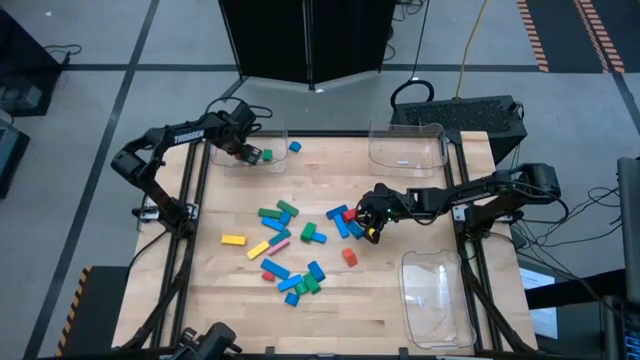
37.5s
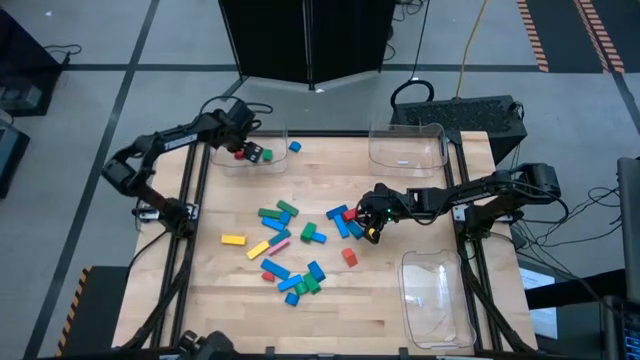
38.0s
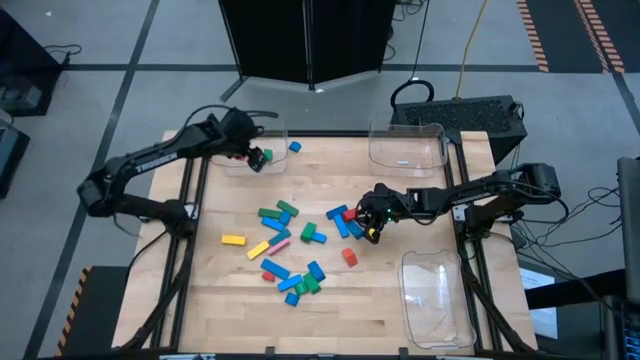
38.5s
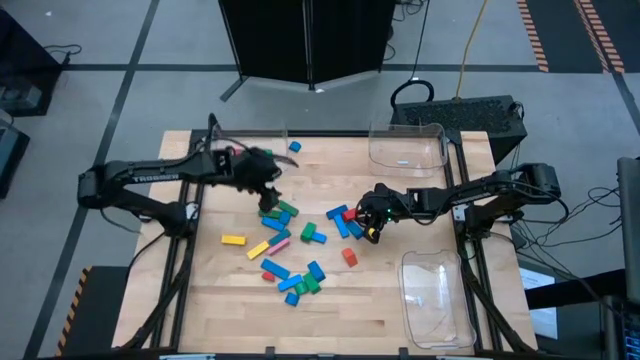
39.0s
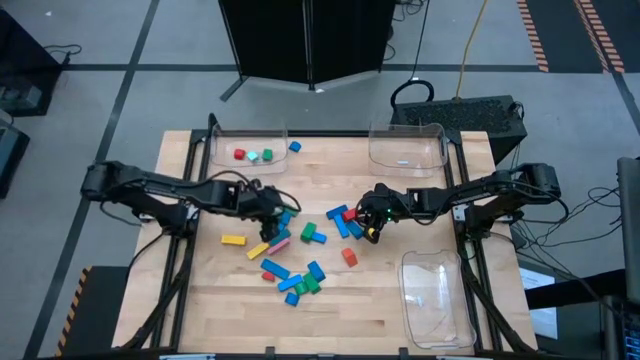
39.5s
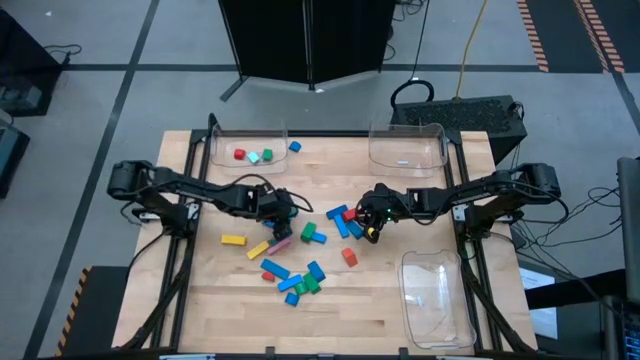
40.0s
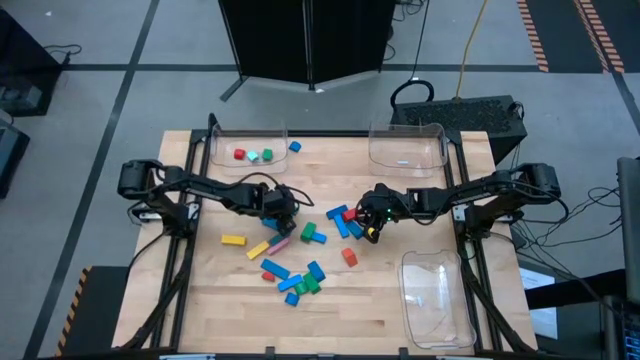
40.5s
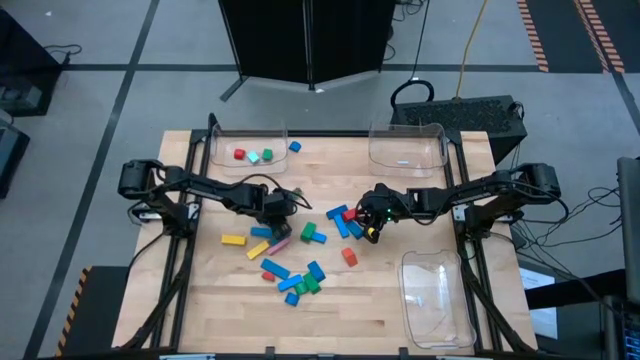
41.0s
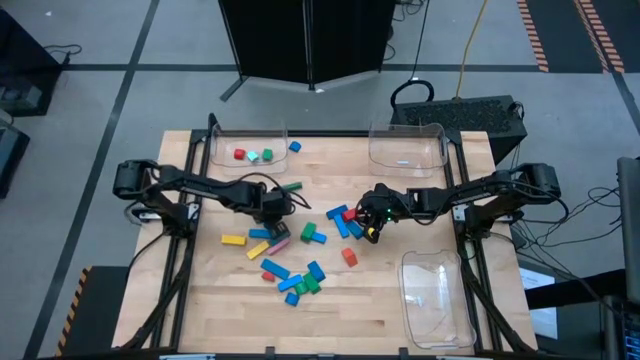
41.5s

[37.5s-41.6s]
Task: Sort blocks by size
Put the blue half-circle block into the top left transparent bin

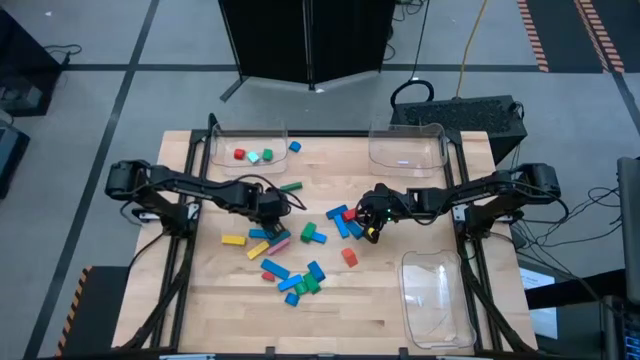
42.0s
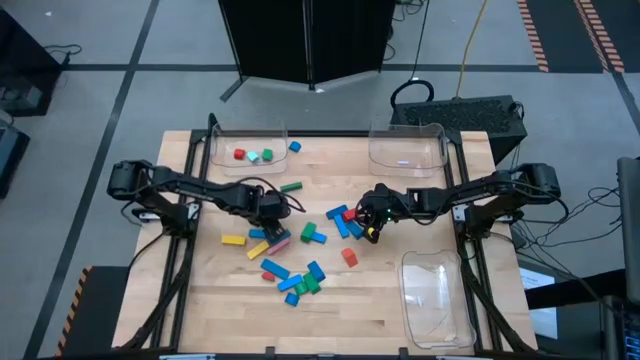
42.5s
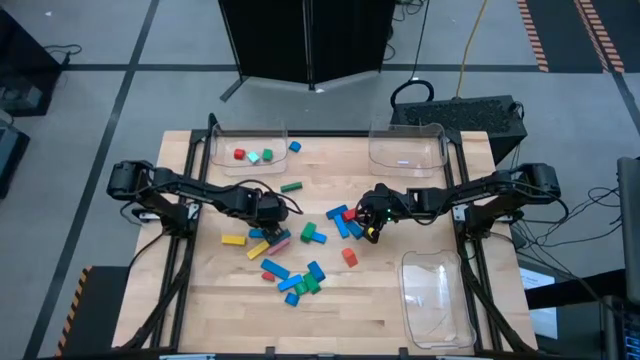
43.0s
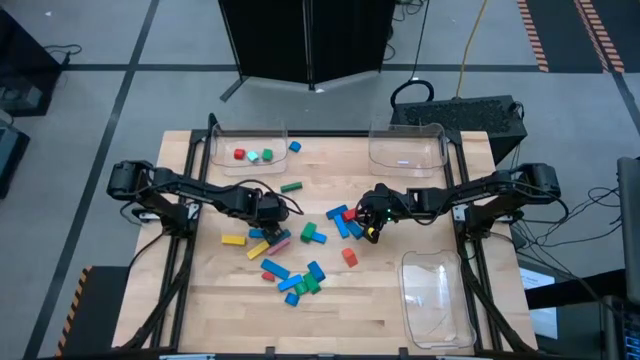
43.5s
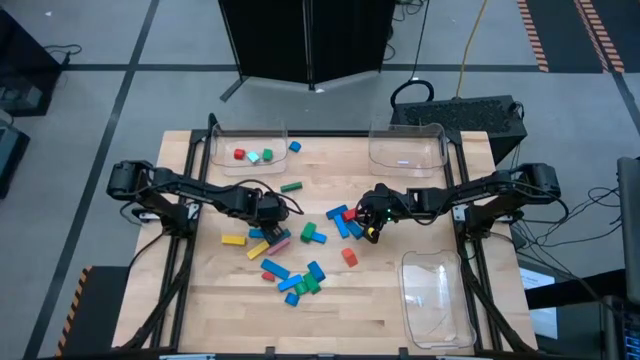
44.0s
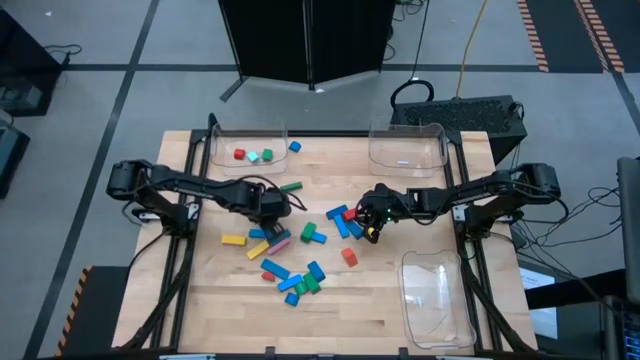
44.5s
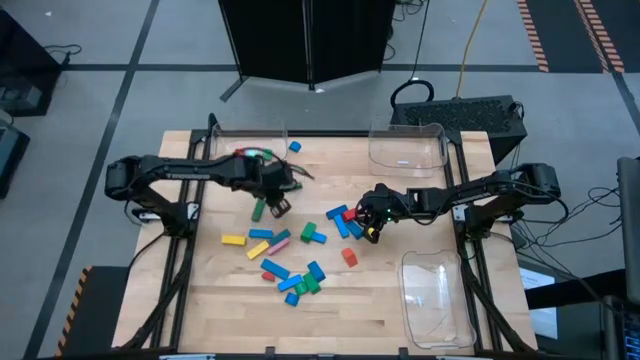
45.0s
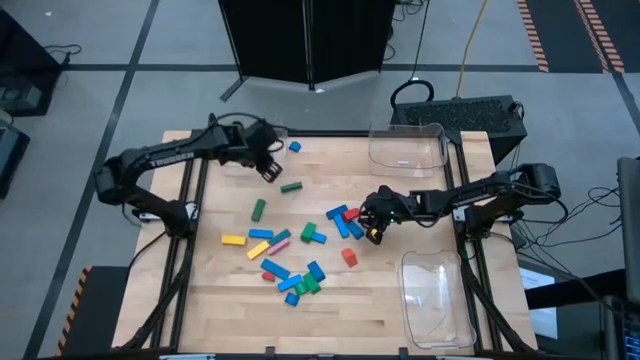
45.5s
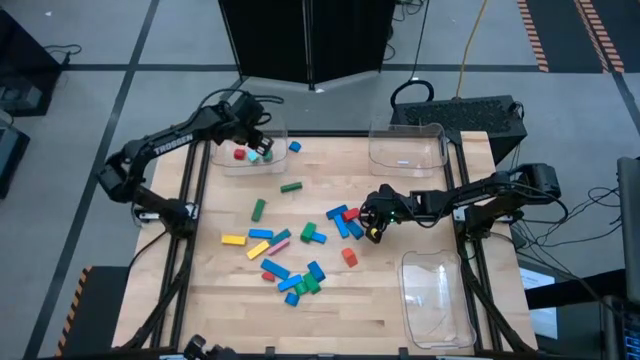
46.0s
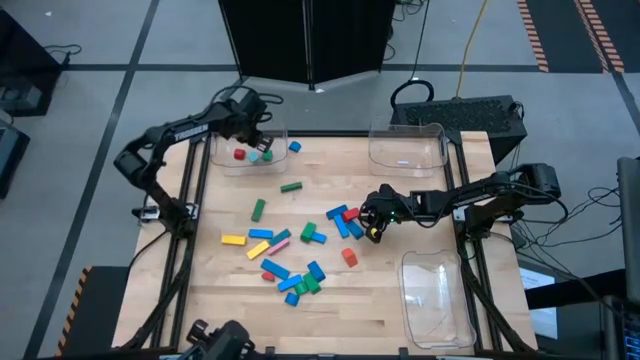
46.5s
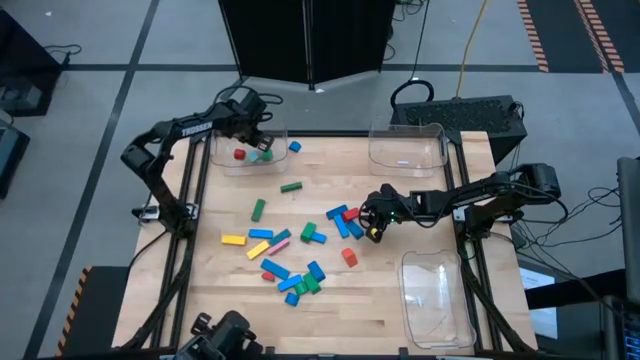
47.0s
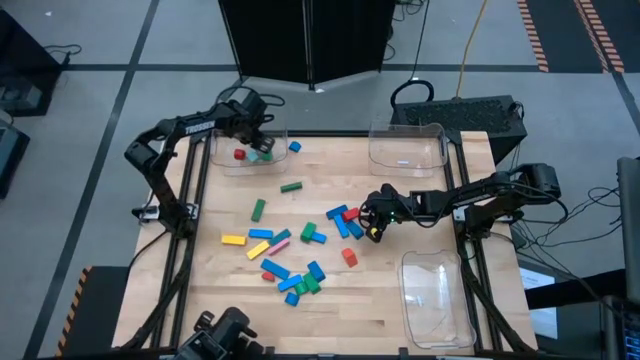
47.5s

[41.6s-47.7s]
Put the blue half-circle block into the top left transparent bin

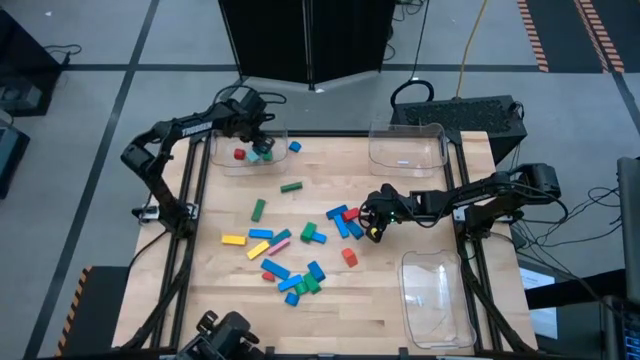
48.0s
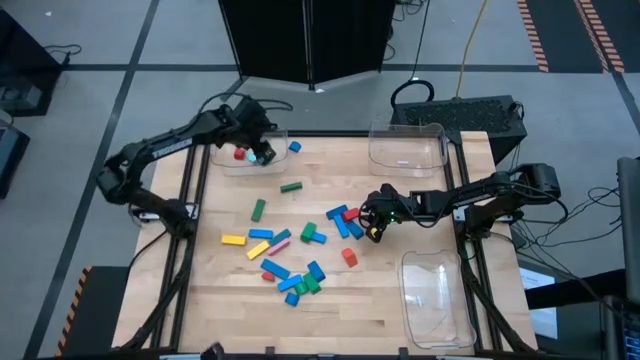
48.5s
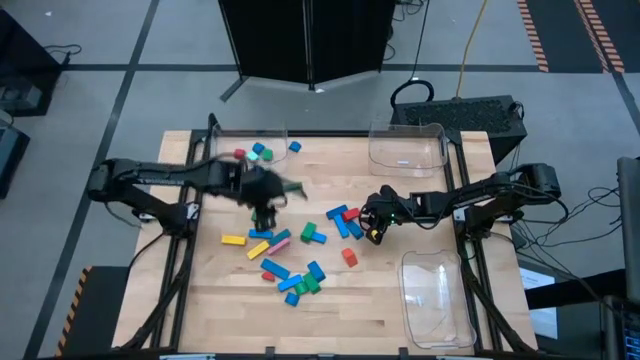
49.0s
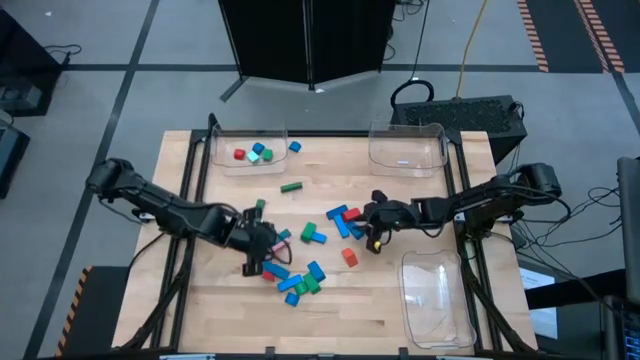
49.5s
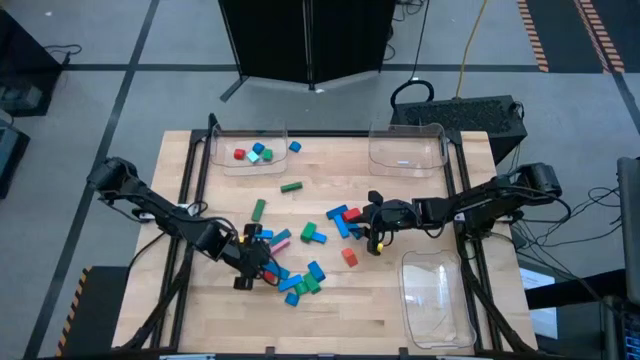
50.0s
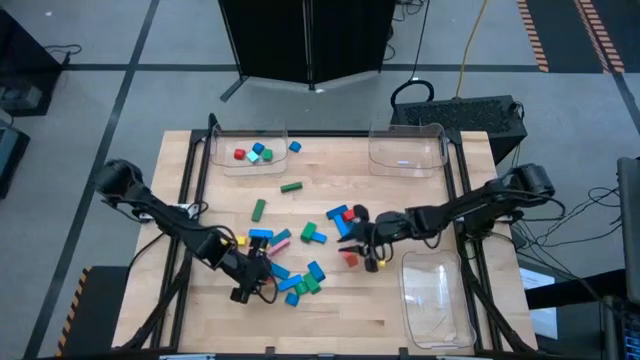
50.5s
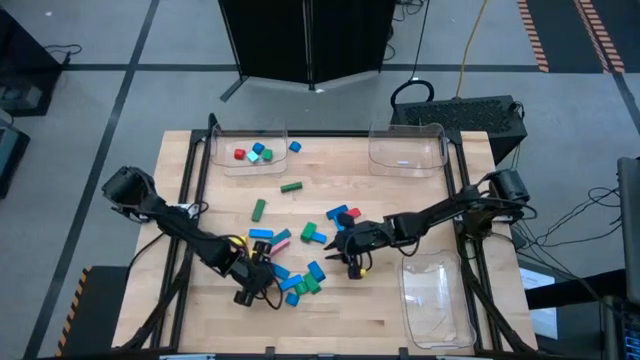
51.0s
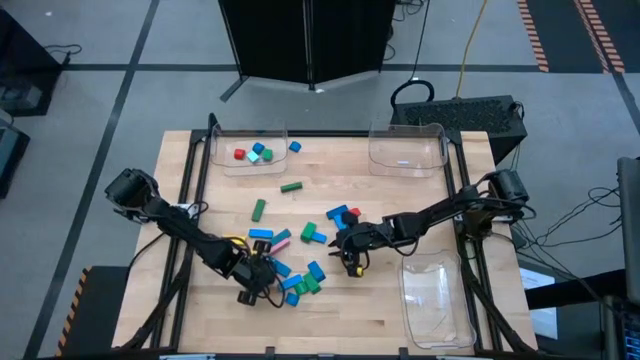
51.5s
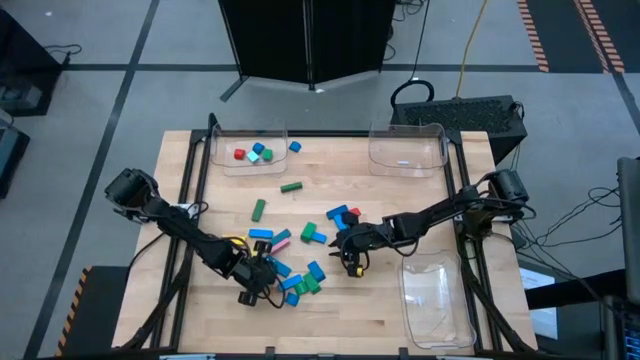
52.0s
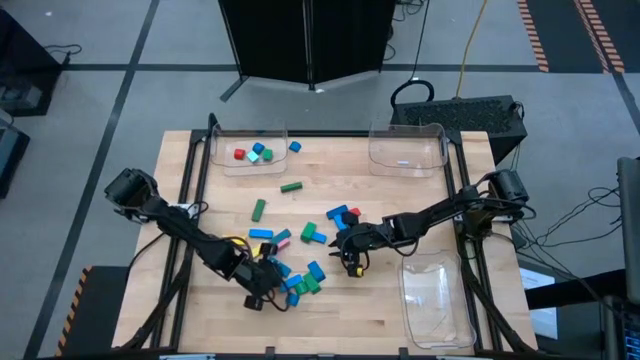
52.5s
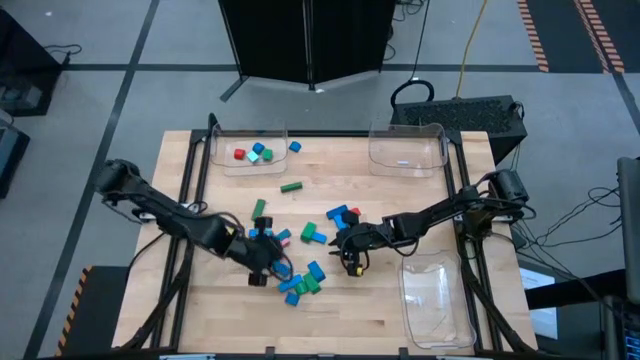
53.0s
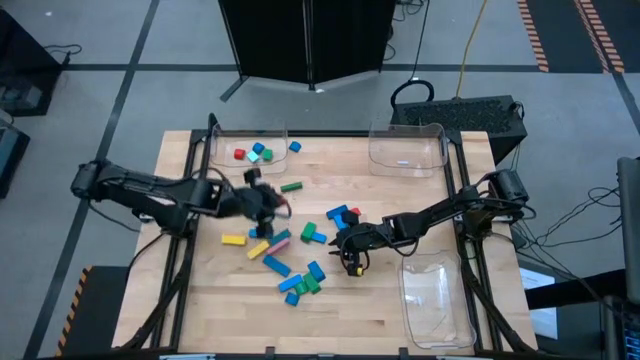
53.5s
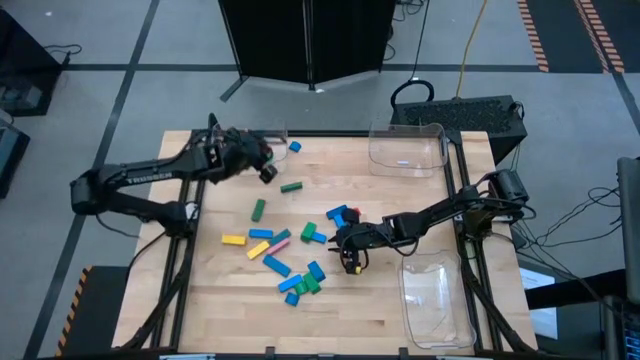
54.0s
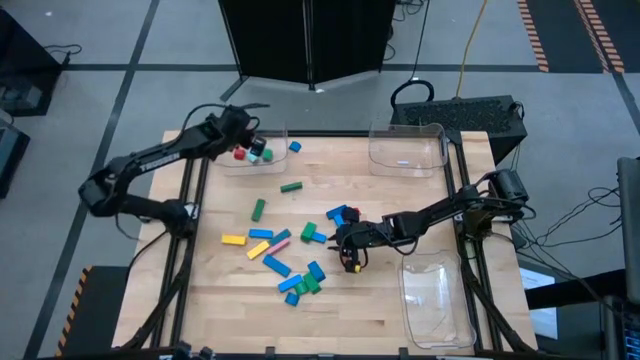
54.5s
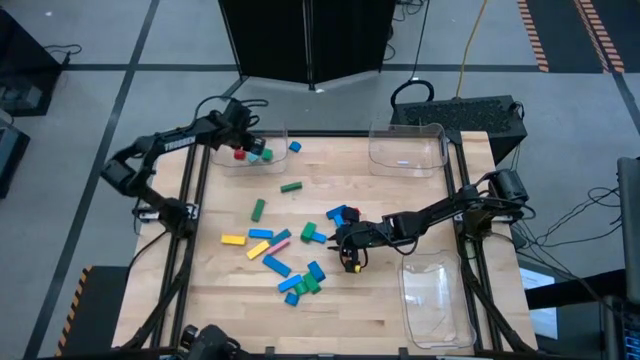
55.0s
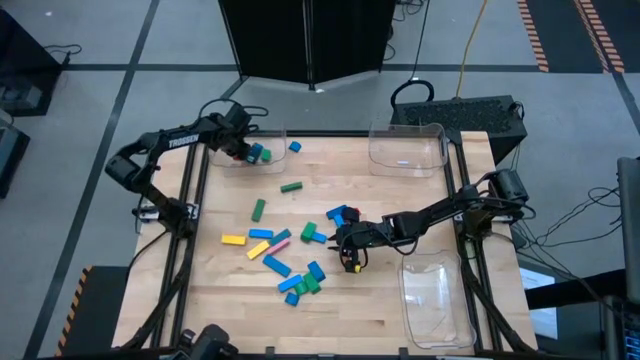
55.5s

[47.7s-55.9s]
Put the red half-circle block into the top left transparent bin

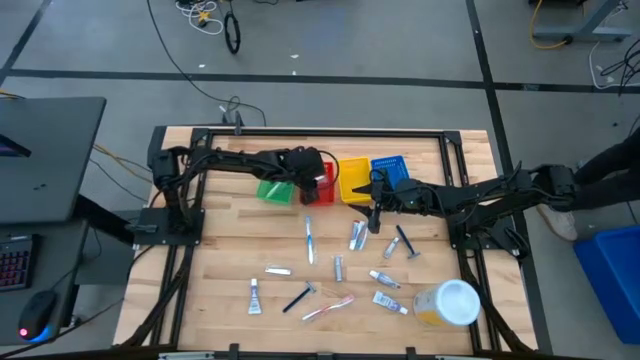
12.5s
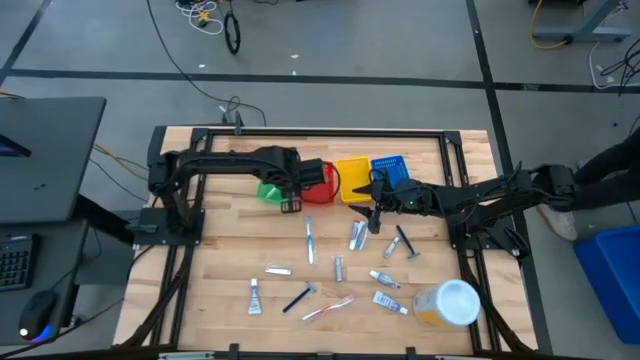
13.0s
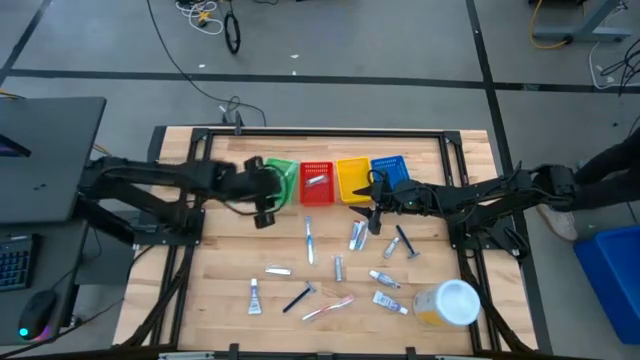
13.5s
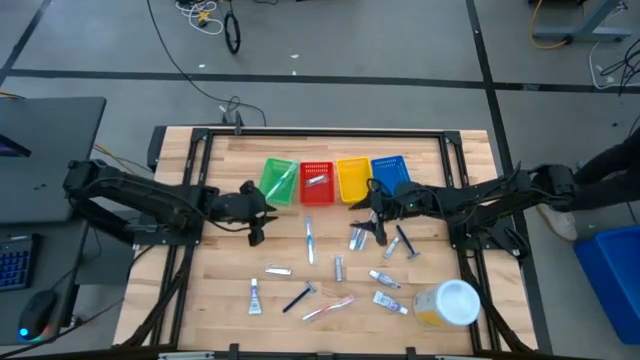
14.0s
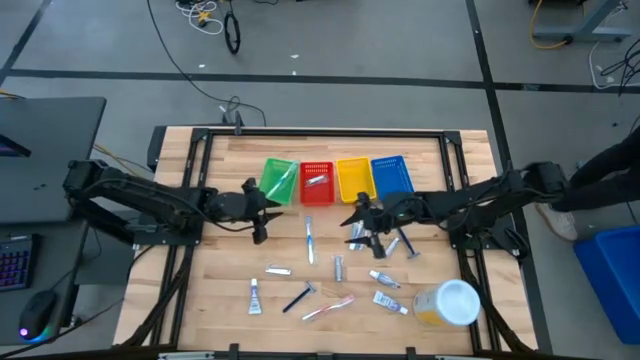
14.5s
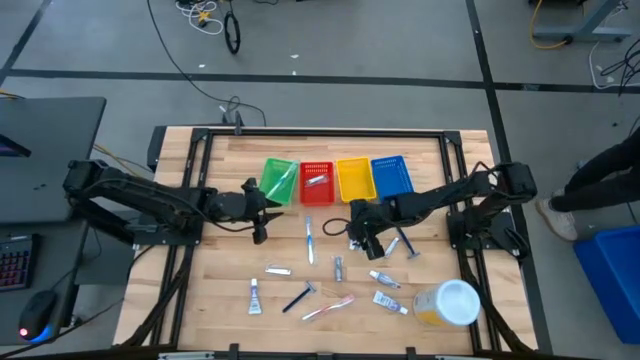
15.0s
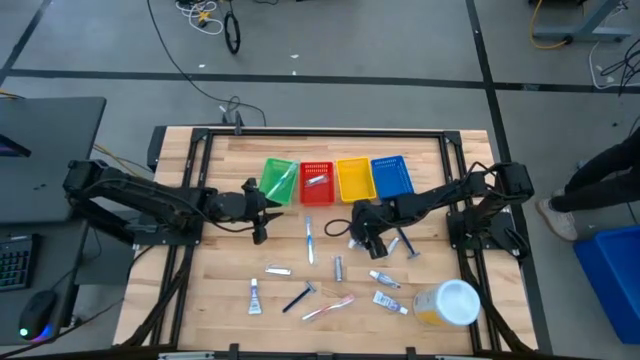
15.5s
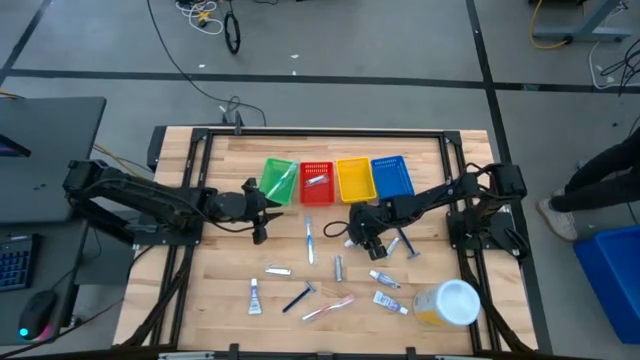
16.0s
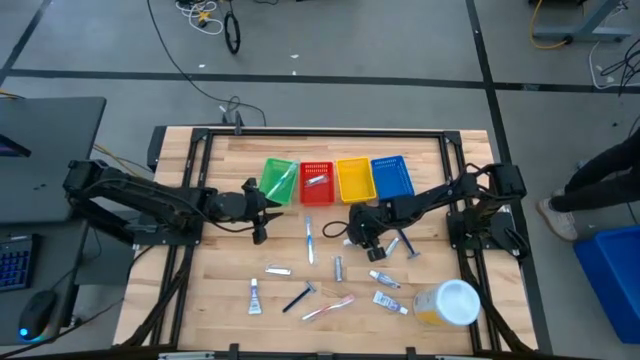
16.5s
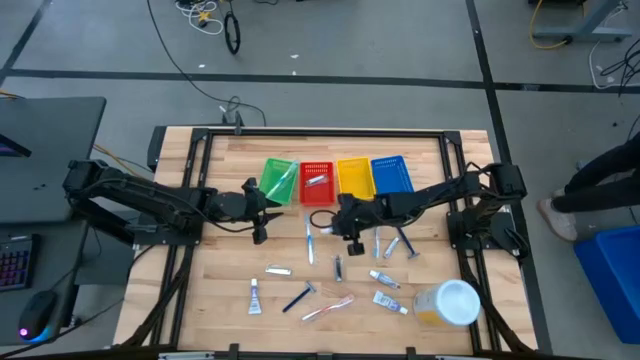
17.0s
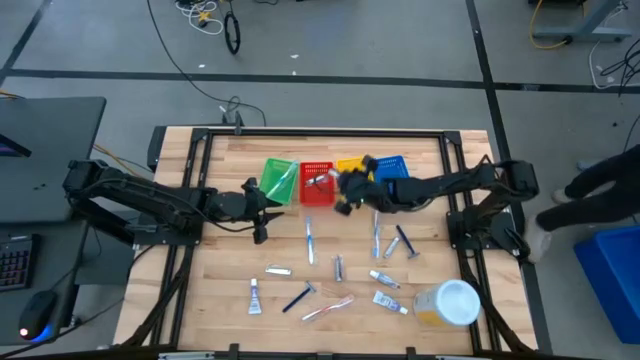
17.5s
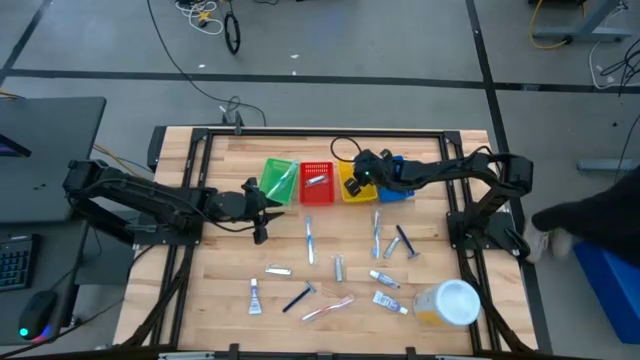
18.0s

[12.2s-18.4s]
Task: Pick & Place Travel size toiletries
Put the white toothpaste into the yellow bin
